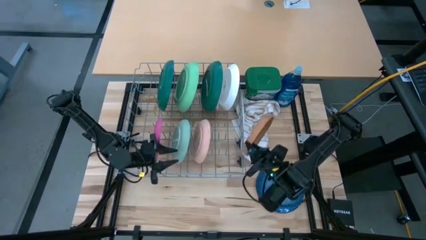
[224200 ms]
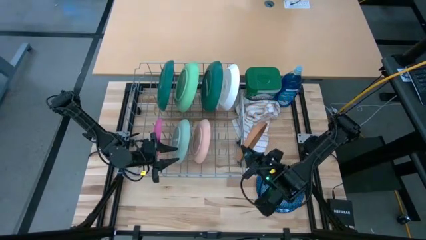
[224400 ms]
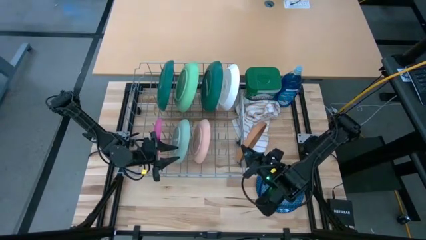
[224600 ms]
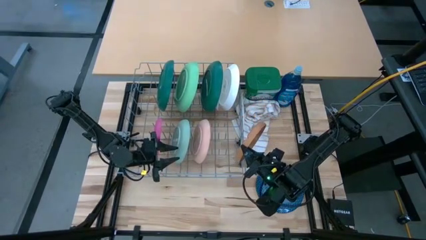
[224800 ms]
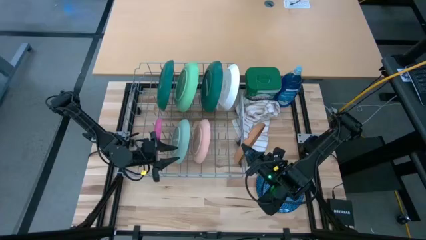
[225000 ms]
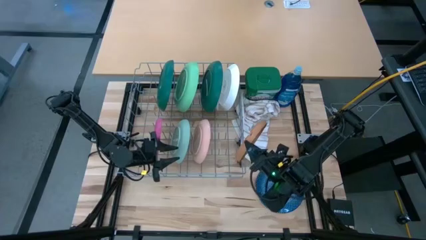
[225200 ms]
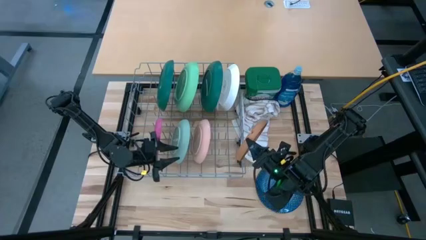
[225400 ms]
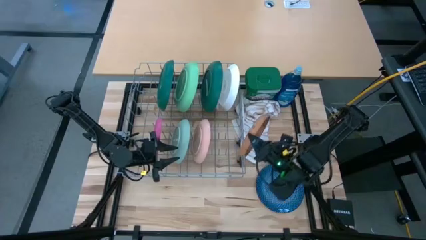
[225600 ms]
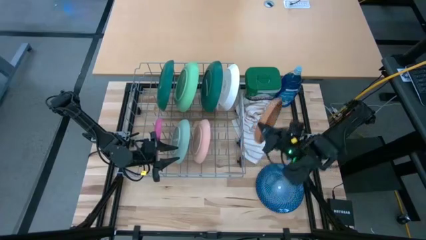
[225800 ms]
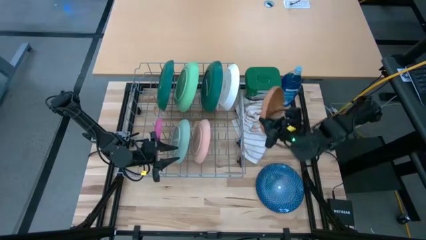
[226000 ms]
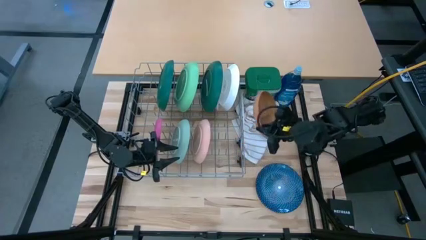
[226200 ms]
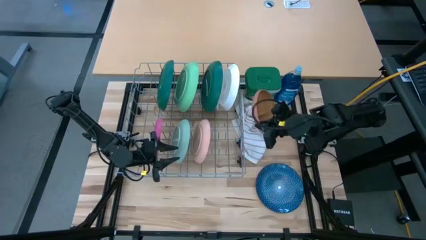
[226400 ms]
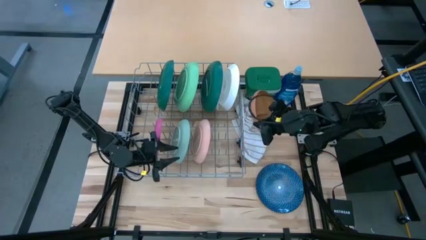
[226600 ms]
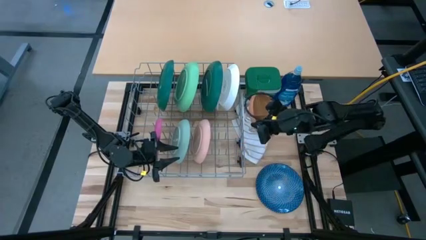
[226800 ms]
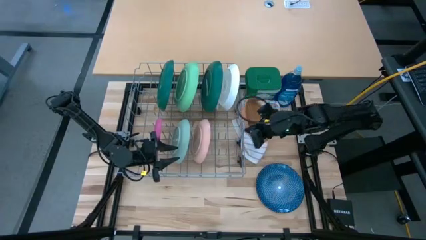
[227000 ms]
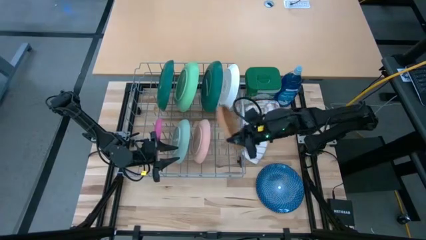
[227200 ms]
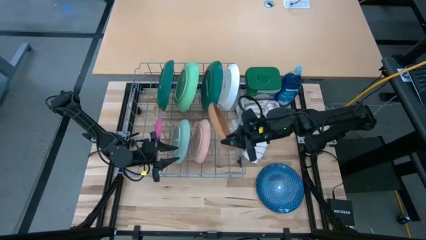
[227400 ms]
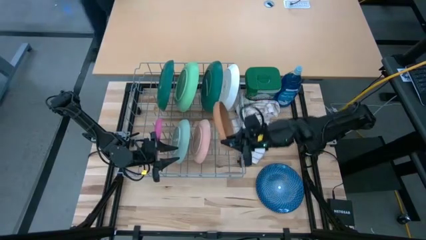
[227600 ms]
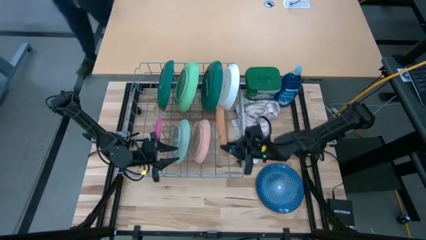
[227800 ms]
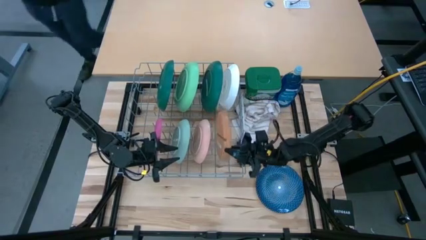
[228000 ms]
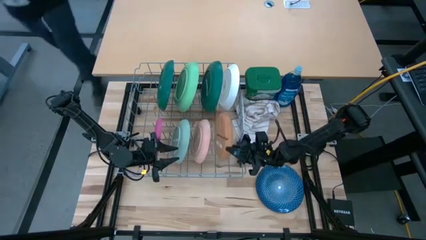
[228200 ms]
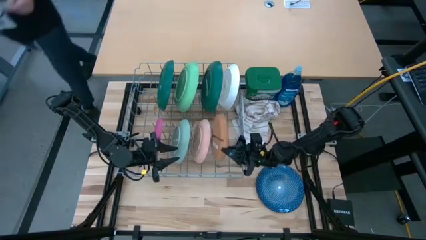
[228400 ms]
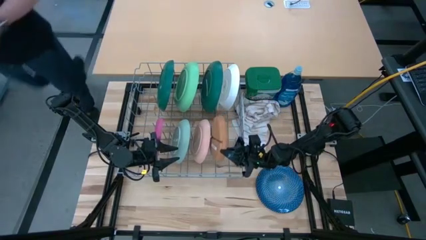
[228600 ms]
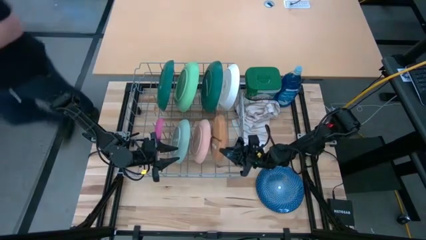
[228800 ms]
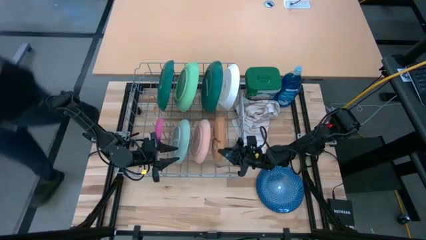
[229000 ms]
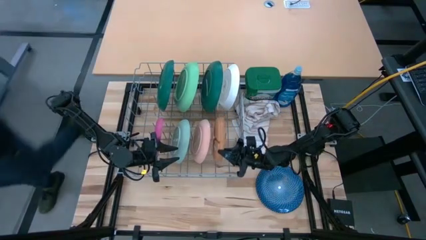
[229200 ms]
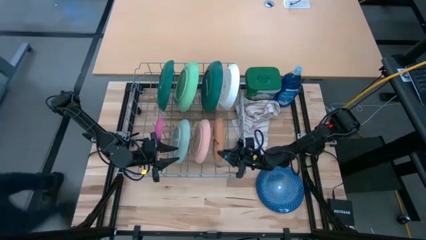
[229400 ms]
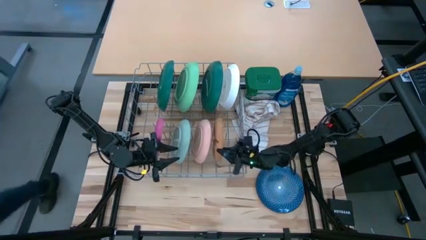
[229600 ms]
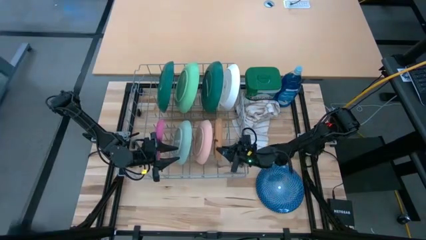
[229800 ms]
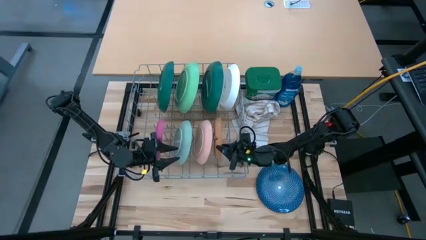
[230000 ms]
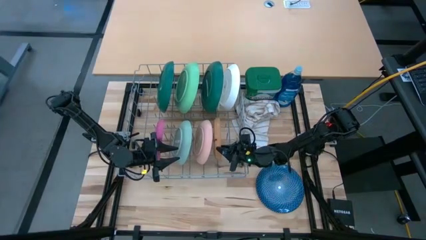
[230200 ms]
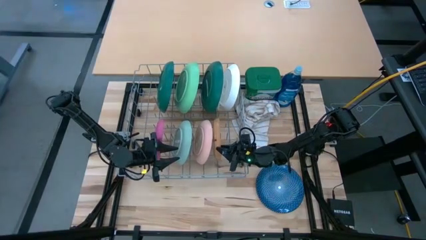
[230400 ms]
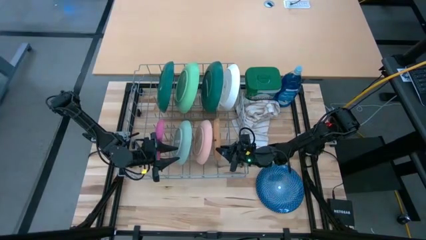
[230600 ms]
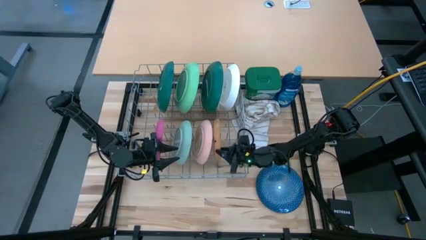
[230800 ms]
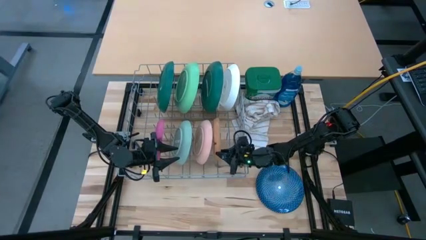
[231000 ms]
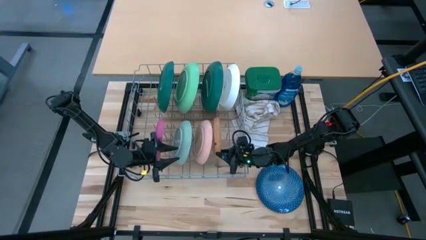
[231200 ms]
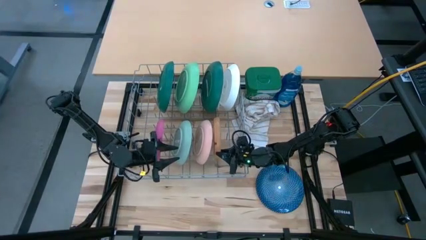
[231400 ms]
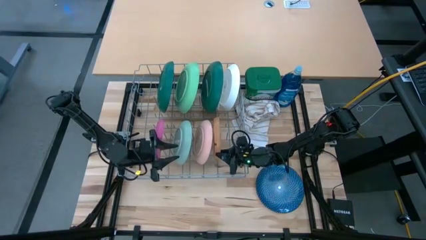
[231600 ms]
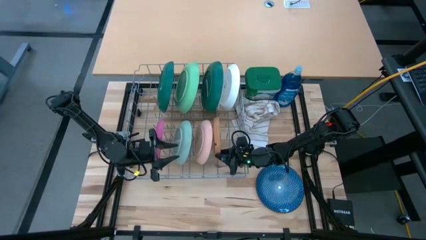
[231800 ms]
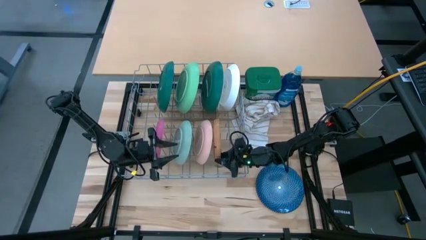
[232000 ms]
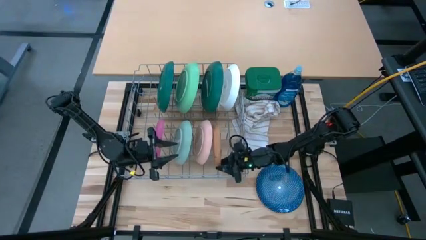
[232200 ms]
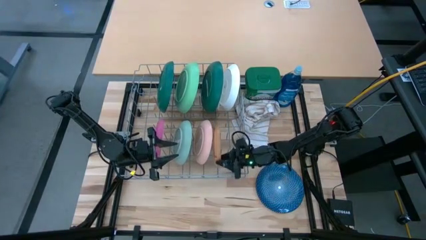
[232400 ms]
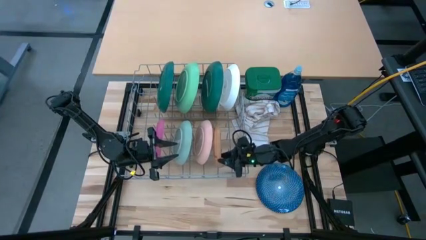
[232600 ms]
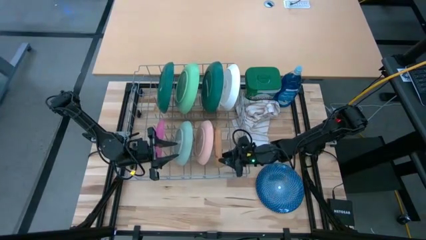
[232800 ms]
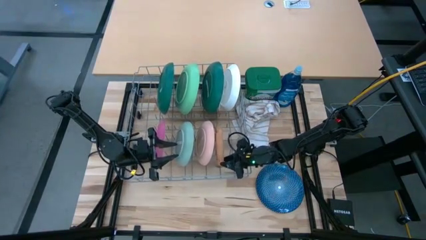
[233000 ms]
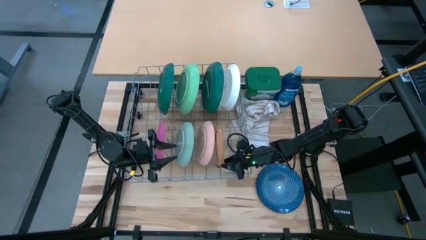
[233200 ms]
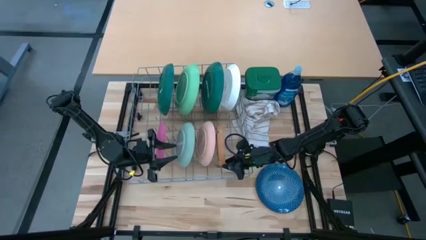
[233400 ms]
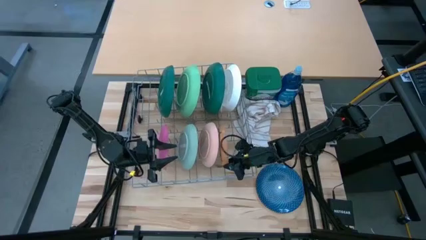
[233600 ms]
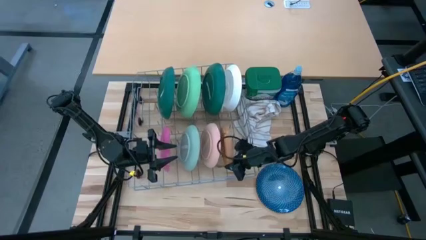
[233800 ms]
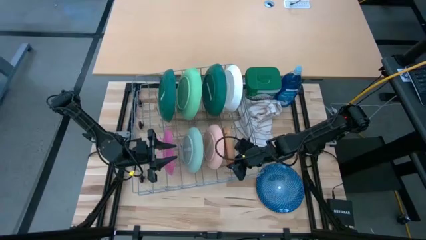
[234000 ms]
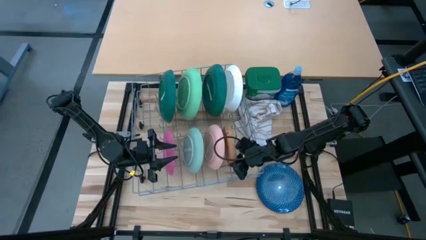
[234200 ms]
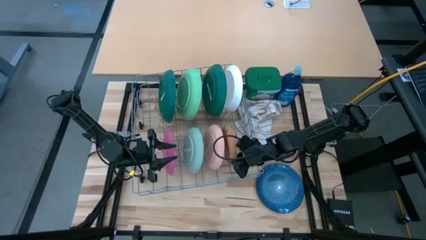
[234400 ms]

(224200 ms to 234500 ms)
Task: Sort dishes
Put the brown plate in the dish rack
